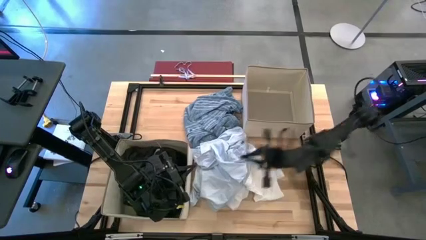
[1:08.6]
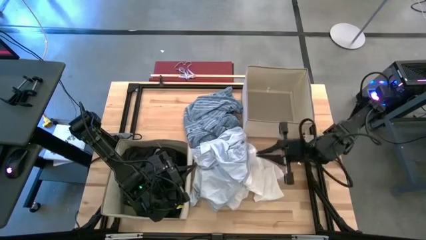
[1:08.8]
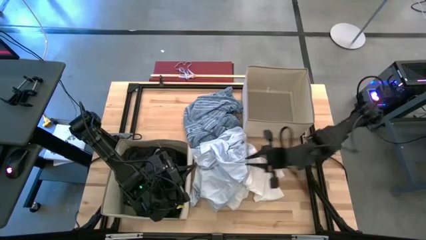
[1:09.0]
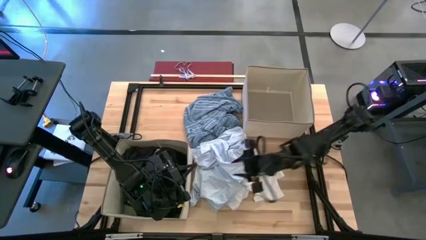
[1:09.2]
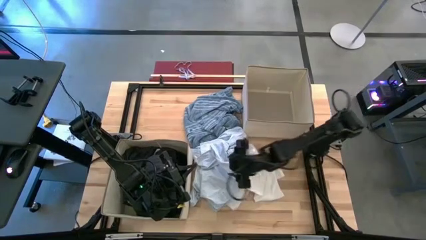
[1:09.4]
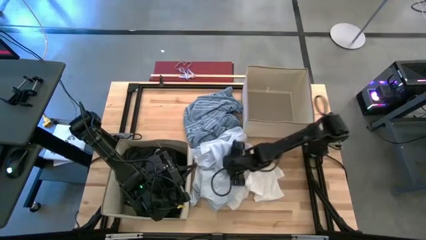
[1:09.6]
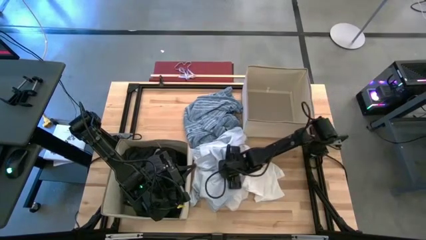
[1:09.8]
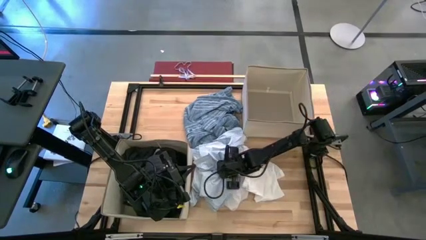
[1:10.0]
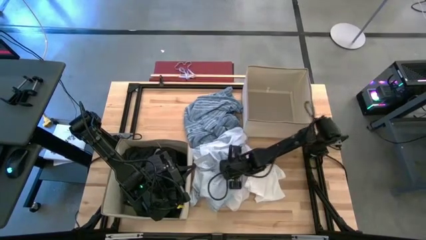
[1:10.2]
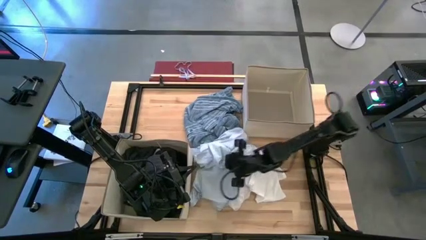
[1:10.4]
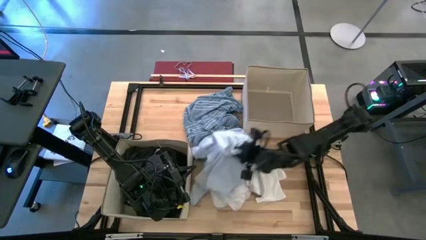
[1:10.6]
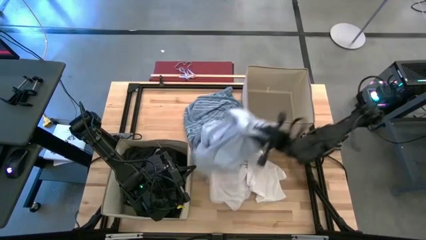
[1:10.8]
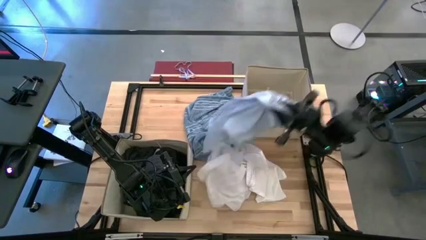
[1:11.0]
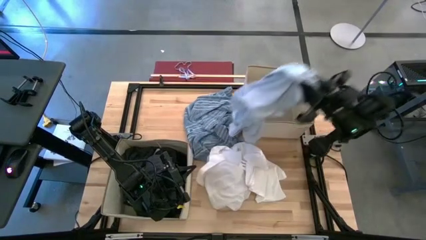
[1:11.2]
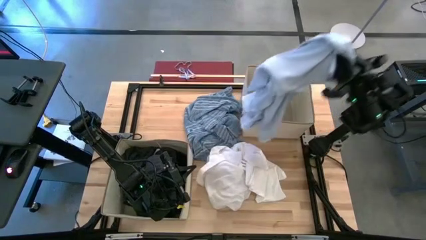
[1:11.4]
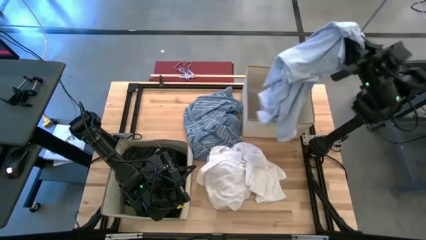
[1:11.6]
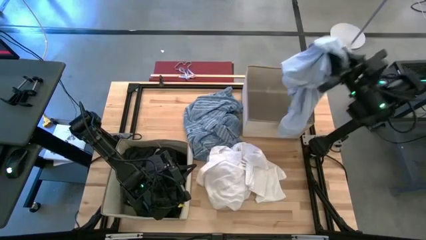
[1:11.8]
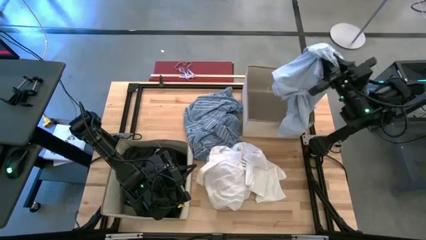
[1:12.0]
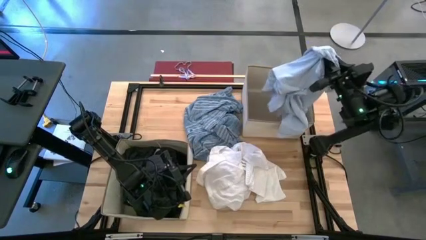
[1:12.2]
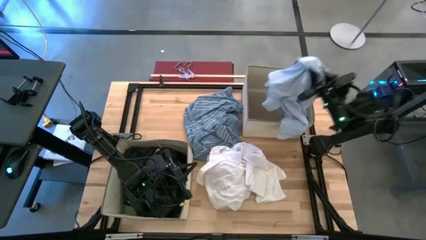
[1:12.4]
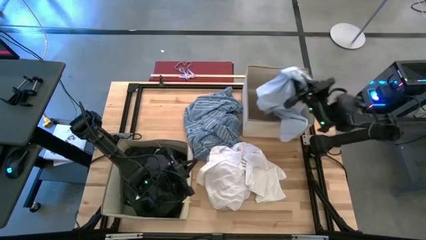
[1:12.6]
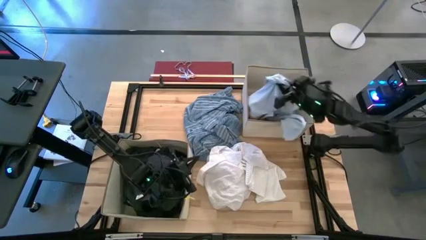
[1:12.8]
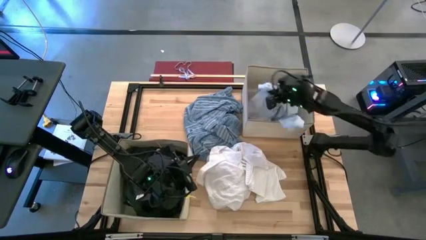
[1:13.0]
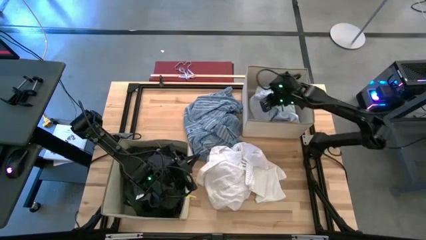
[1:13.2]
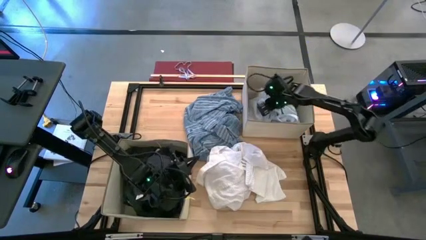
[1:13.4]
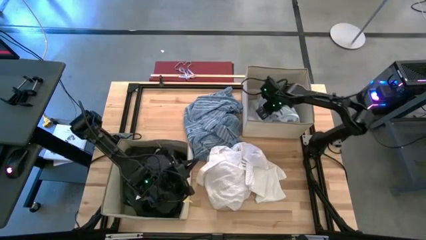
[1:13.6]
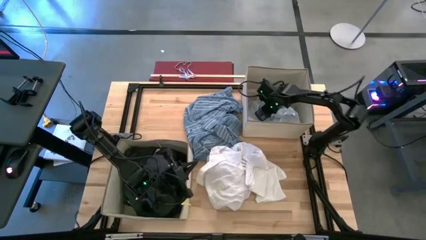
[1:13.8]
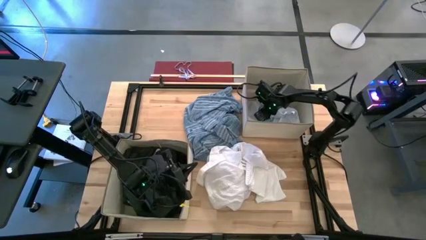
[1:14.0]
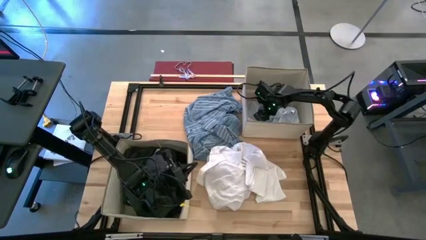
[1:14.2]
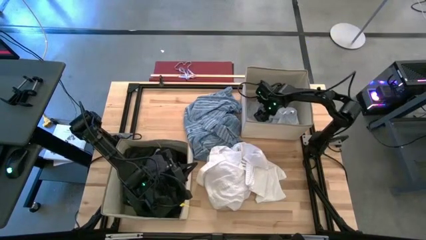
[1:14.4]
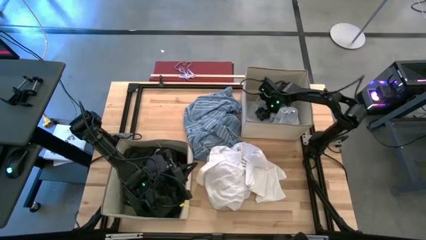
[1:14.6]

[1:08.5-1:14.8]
Task: Sort clothes
Put the blue patterned shirt into the top laundry organizer

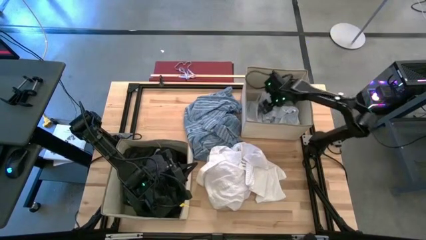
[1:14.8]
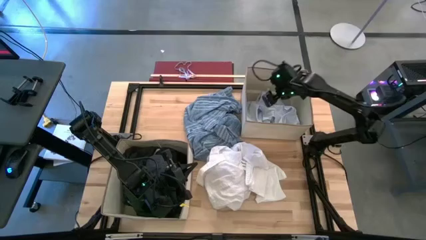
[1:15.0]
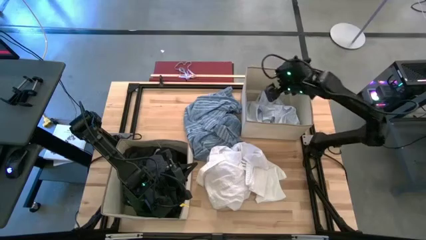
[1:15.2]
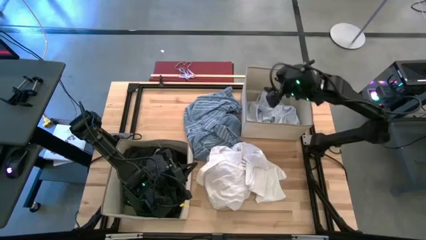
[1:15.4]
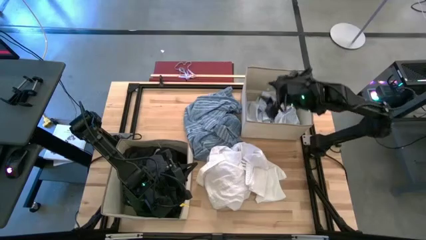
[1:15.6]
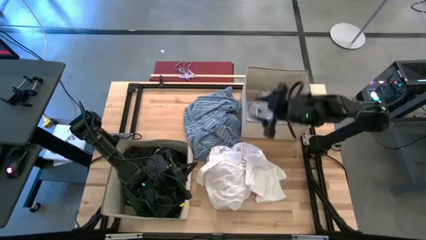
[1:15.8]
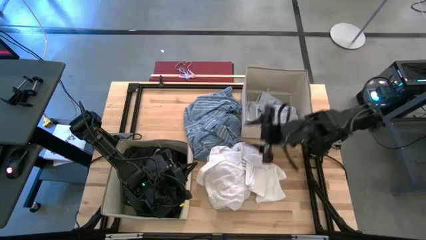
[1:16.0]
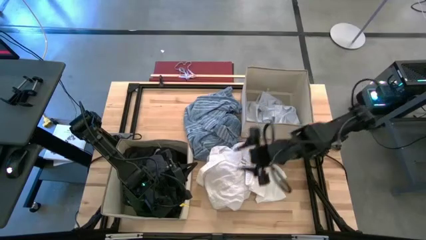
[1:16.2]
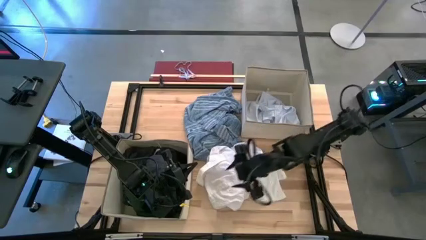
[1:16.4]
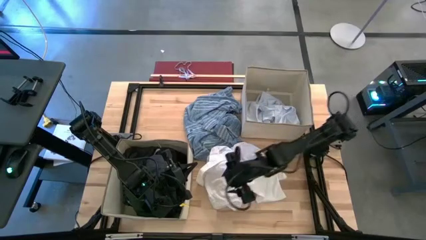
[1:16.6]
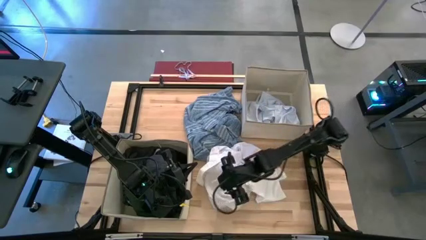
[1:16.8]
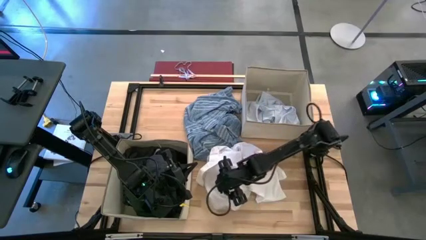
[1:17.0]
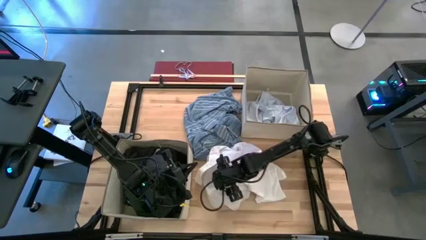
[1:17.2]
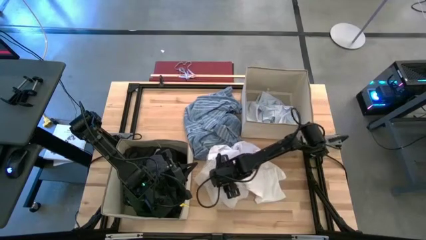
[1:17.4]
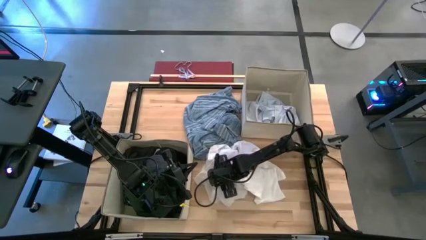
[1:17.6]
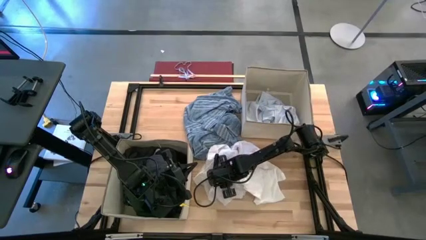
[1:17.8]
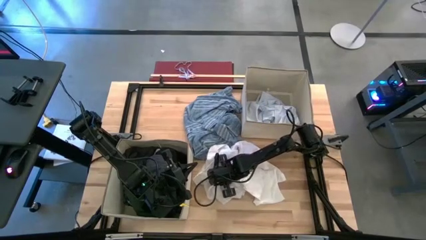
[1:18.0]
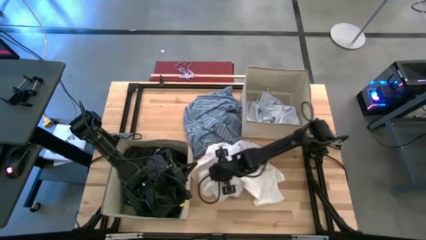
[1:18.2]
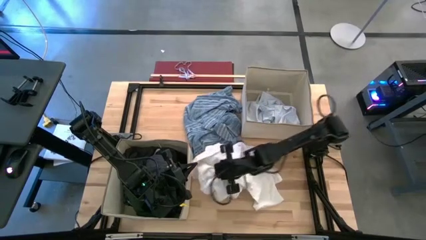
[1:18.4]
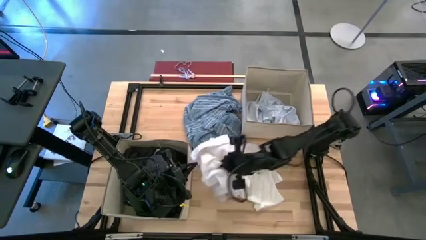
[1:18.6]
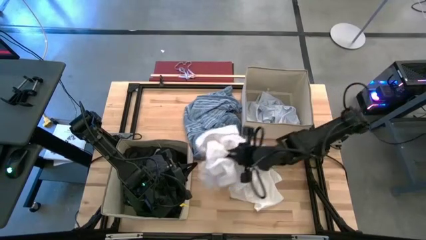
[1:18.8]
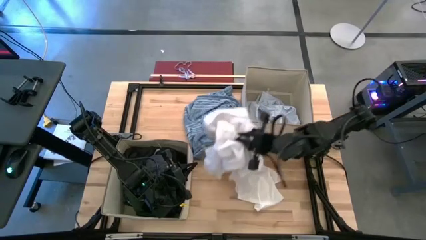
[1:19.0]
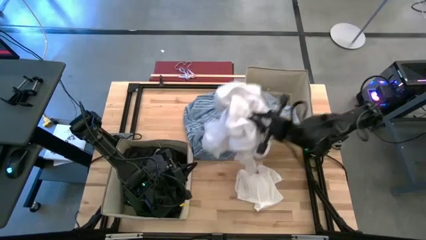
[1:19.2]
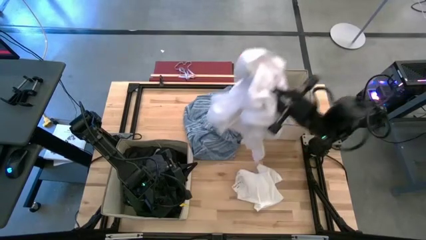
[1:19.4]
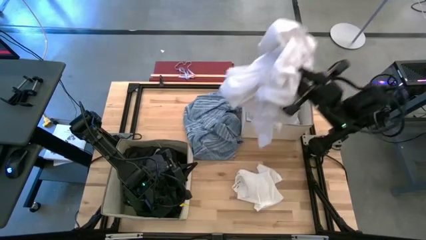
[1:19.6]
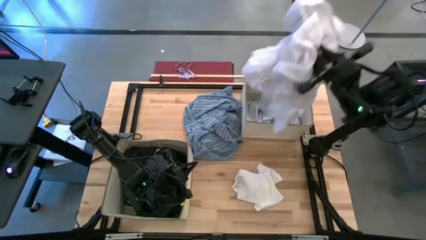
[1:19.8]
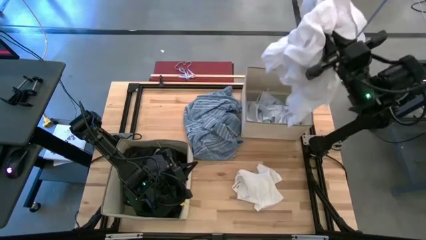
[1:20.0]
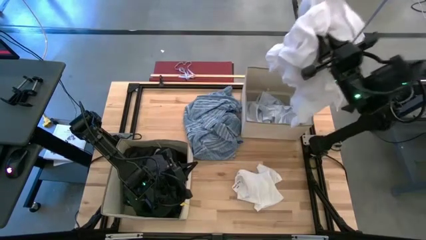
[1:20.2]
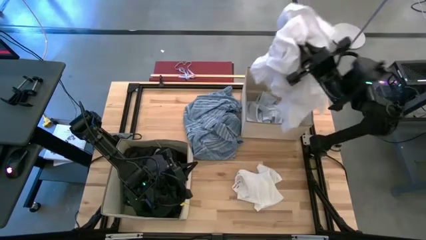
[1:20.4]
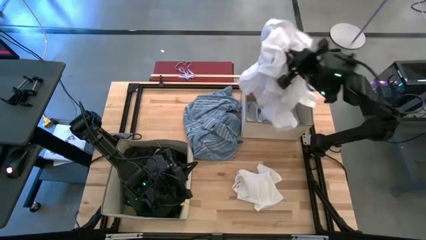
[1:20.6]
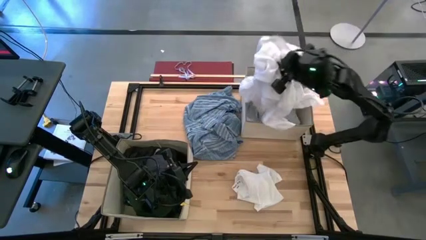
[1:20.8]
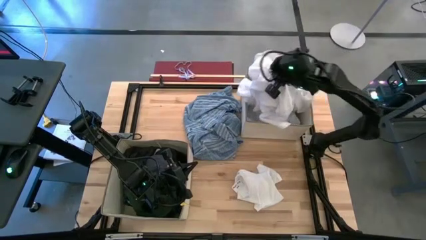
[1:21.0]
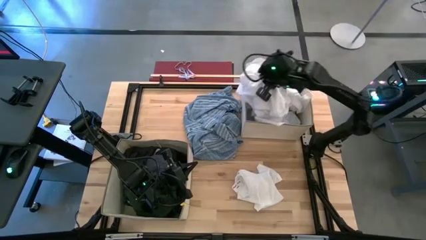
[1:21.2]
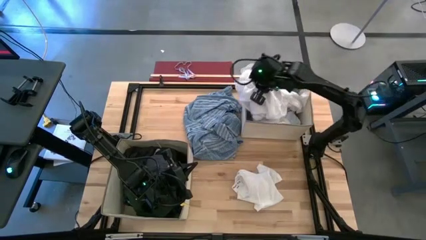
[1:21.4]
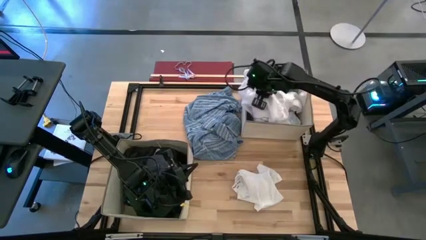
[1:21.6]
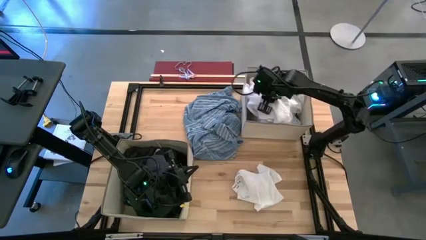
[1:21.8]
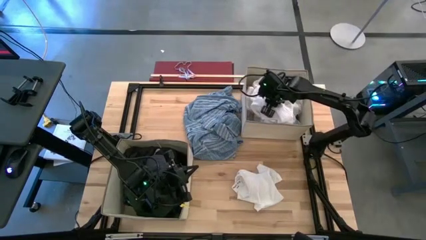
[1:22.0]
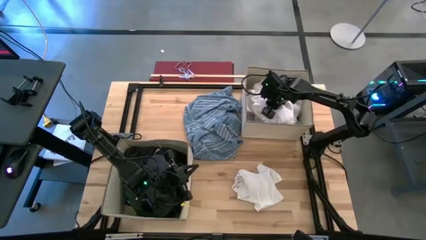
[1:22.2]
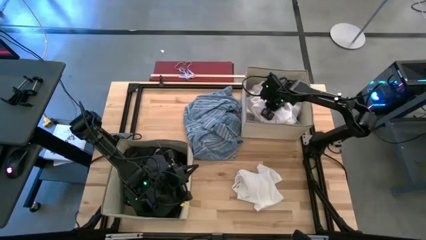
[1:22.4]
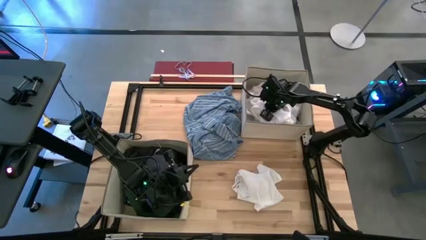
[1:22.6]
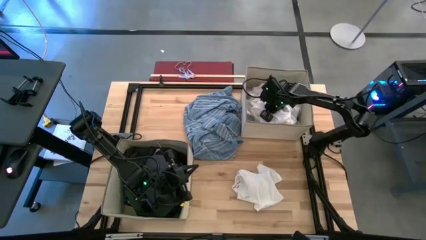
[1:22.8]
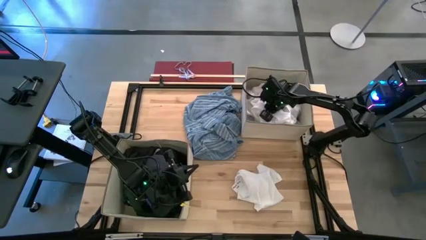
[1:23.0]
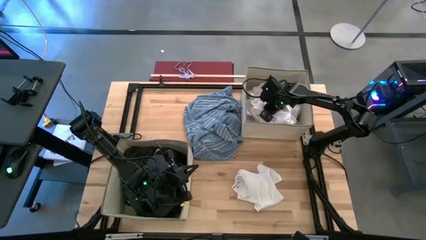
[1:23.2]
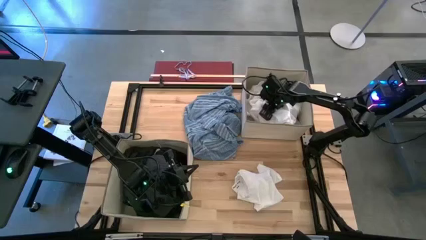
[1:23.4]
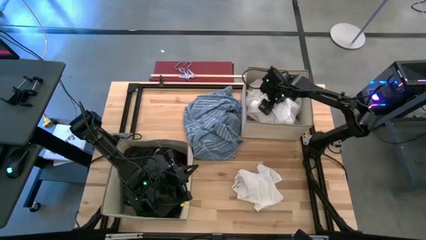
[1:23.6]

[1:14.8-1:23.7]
Put the white shirt into the top laundry organizer
